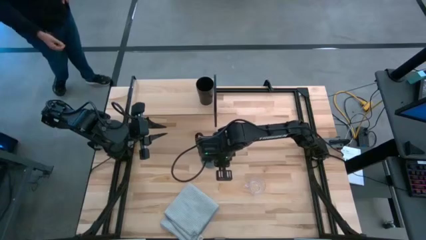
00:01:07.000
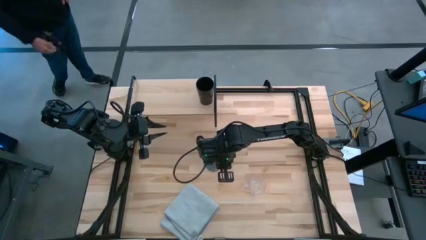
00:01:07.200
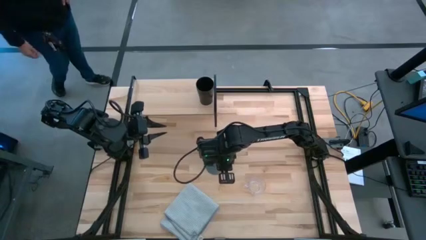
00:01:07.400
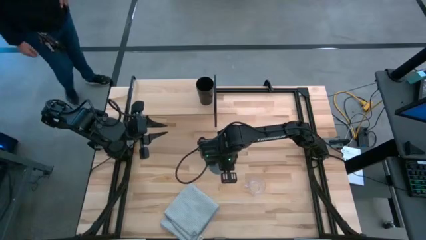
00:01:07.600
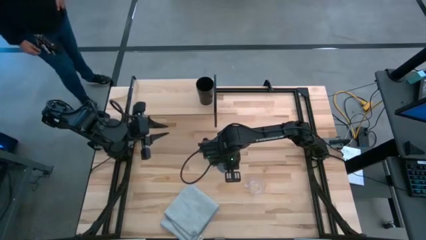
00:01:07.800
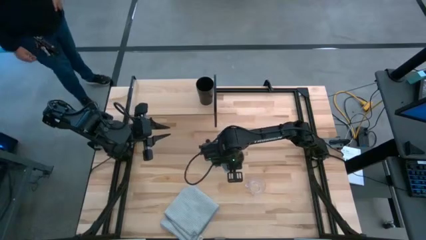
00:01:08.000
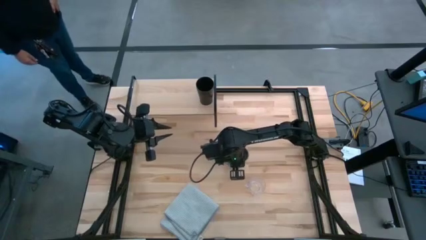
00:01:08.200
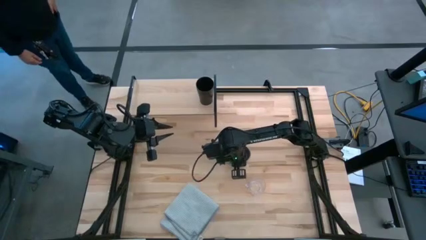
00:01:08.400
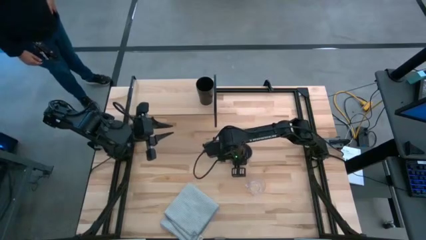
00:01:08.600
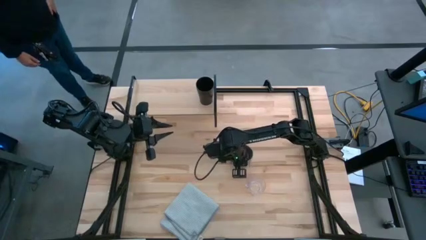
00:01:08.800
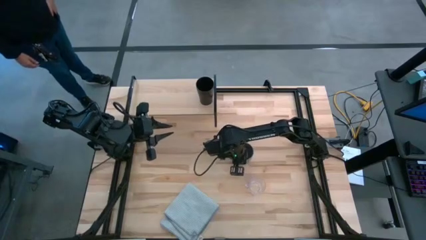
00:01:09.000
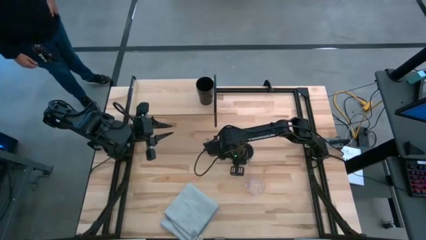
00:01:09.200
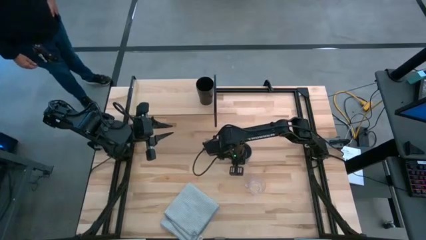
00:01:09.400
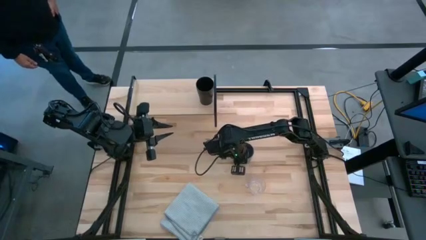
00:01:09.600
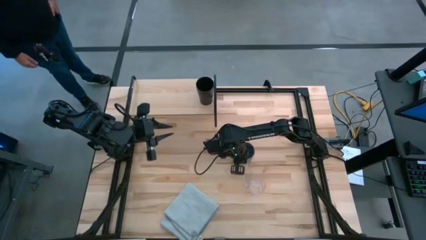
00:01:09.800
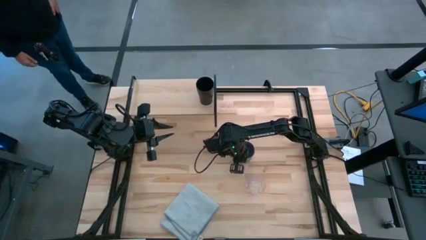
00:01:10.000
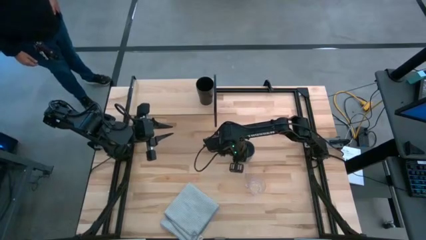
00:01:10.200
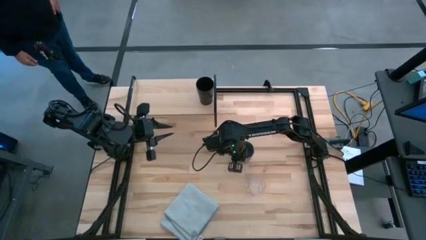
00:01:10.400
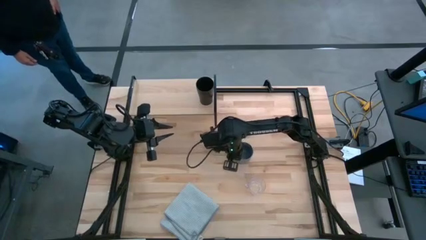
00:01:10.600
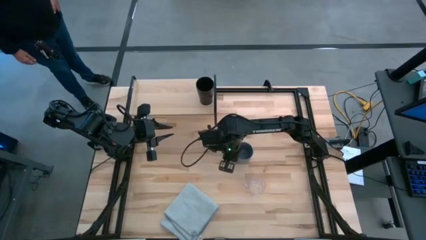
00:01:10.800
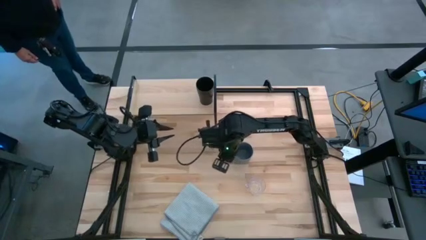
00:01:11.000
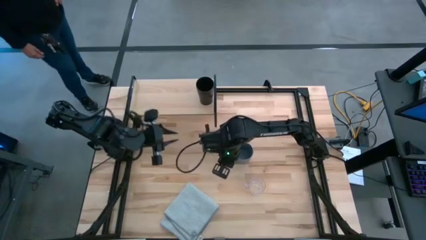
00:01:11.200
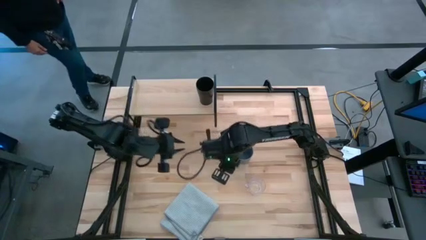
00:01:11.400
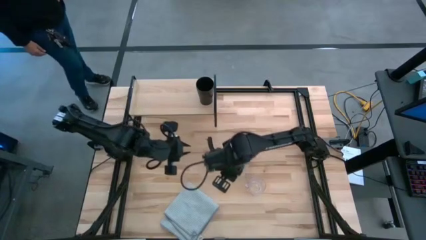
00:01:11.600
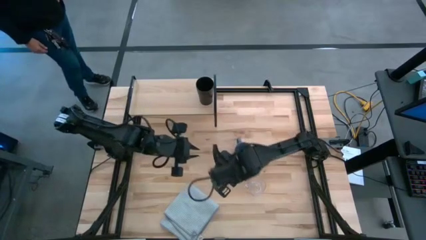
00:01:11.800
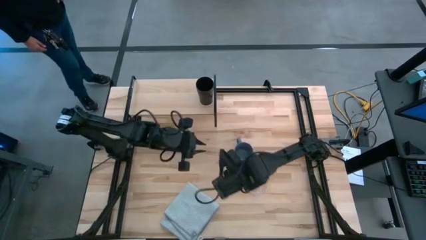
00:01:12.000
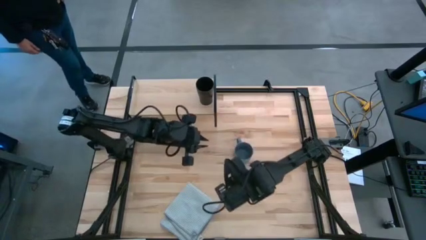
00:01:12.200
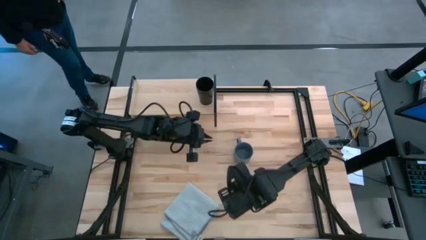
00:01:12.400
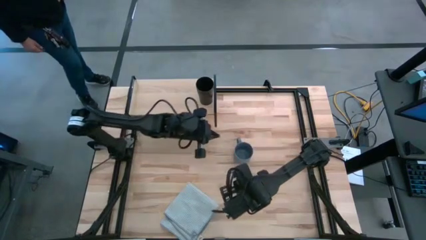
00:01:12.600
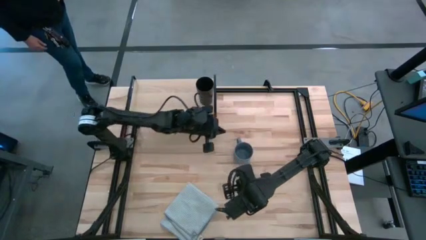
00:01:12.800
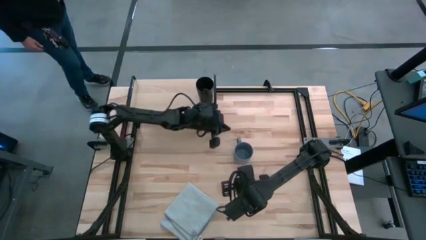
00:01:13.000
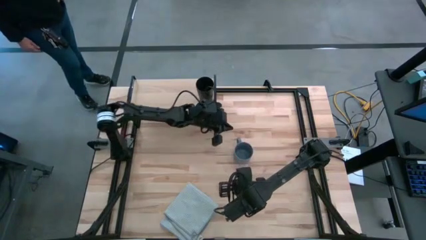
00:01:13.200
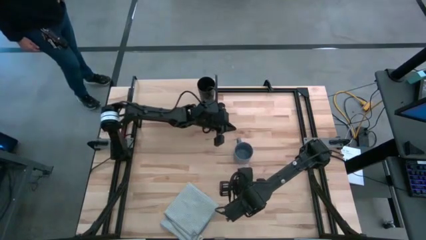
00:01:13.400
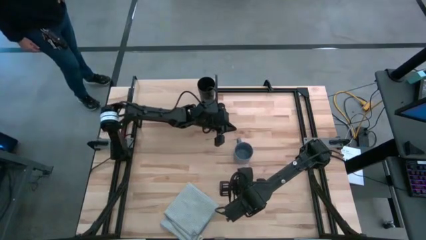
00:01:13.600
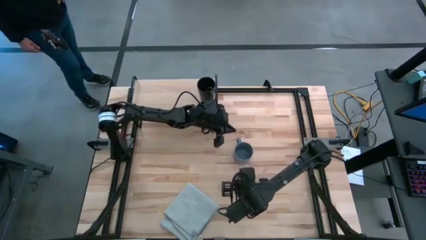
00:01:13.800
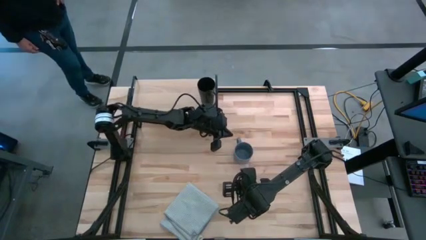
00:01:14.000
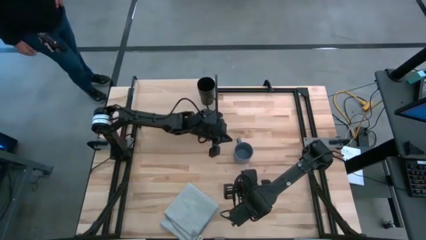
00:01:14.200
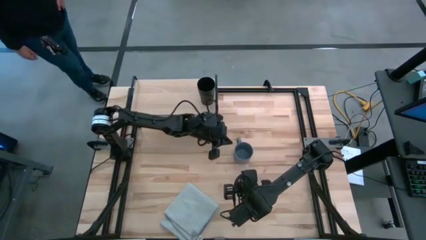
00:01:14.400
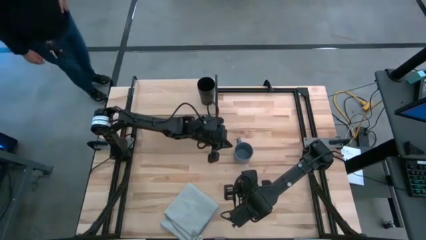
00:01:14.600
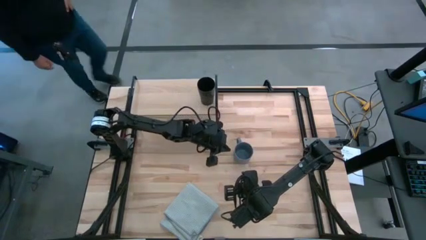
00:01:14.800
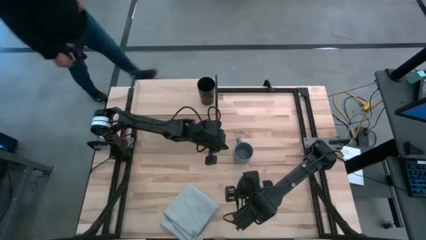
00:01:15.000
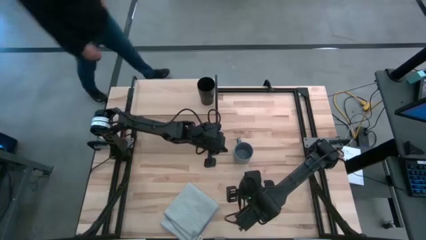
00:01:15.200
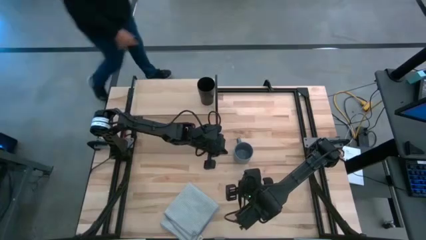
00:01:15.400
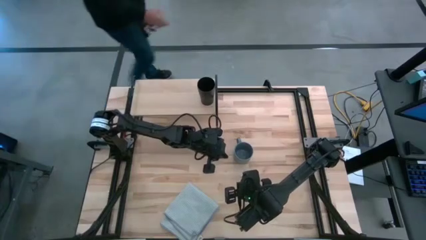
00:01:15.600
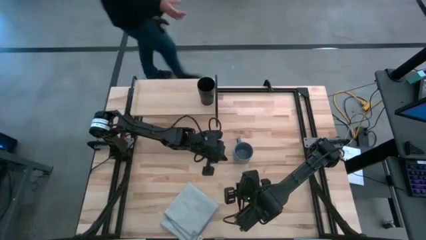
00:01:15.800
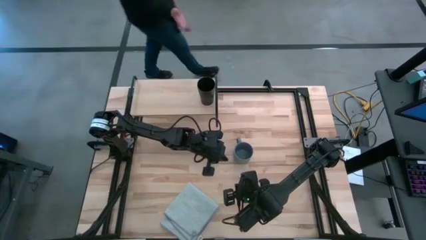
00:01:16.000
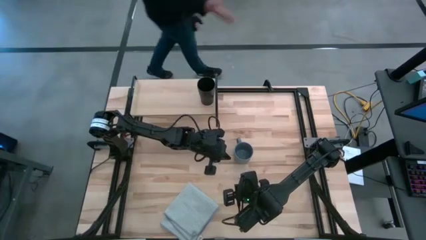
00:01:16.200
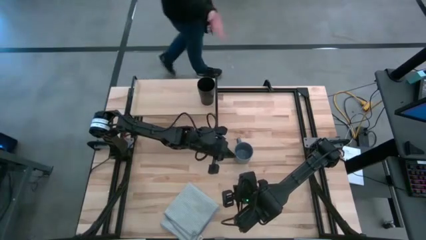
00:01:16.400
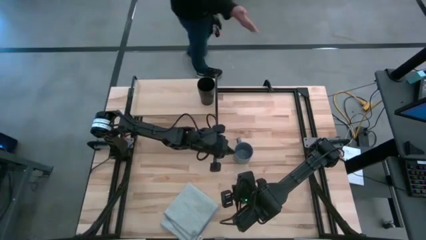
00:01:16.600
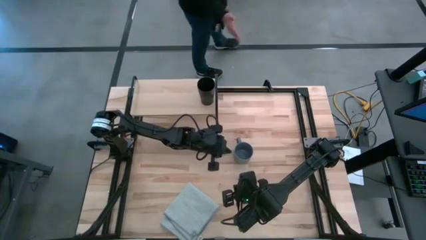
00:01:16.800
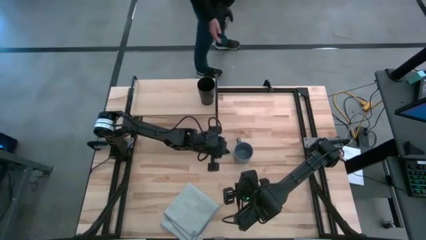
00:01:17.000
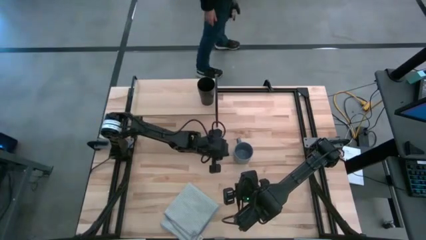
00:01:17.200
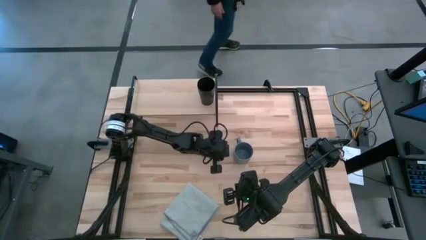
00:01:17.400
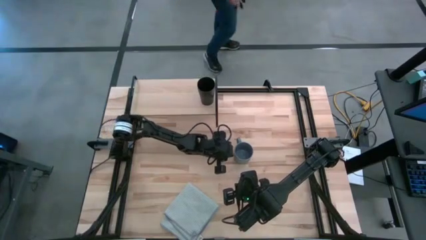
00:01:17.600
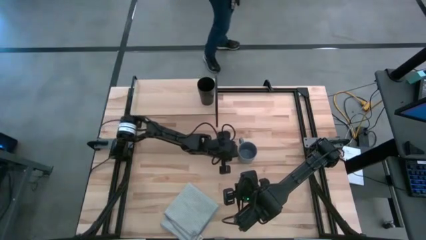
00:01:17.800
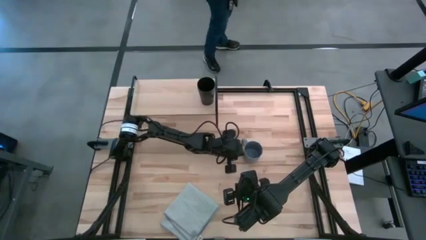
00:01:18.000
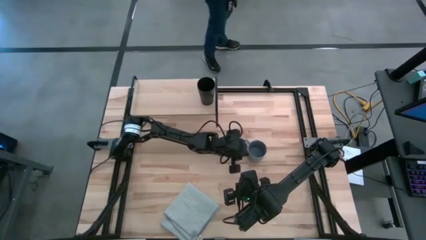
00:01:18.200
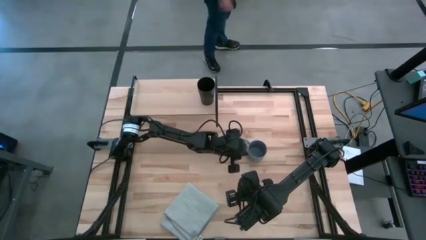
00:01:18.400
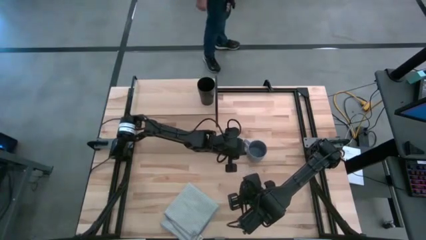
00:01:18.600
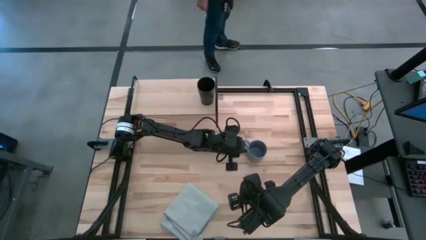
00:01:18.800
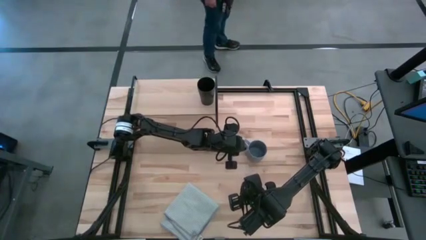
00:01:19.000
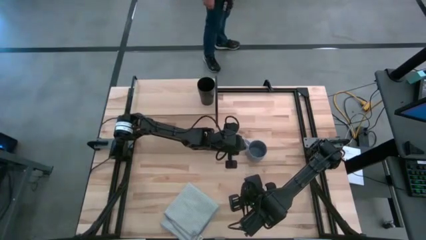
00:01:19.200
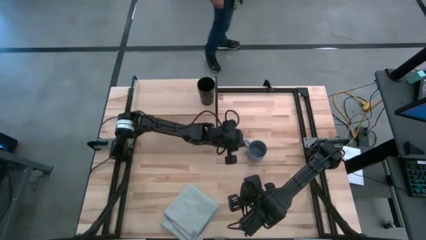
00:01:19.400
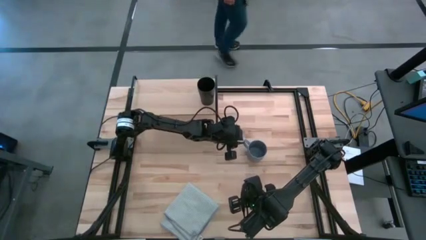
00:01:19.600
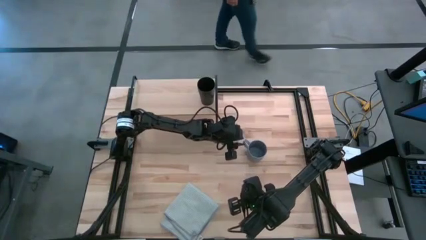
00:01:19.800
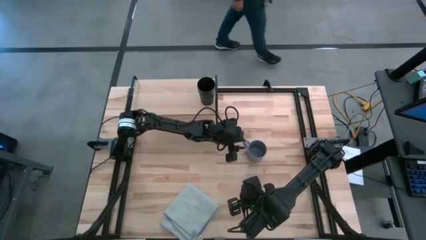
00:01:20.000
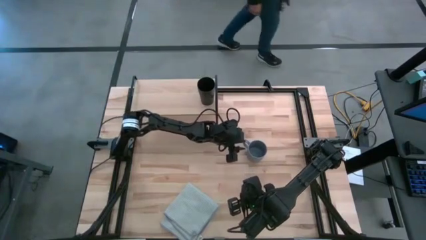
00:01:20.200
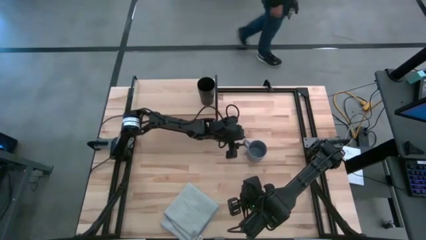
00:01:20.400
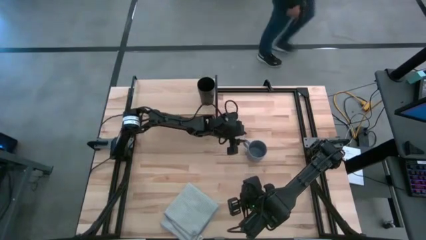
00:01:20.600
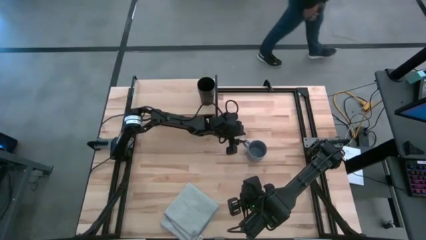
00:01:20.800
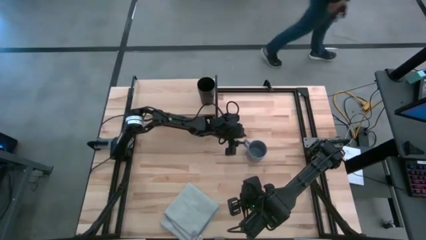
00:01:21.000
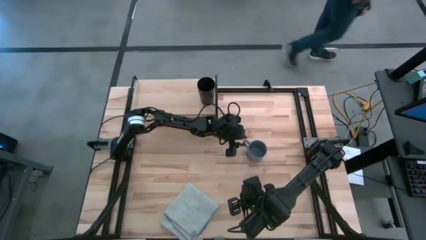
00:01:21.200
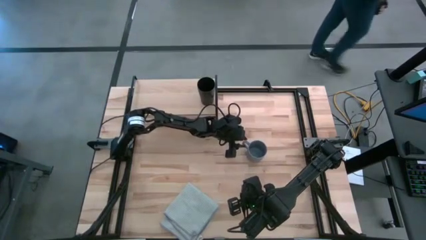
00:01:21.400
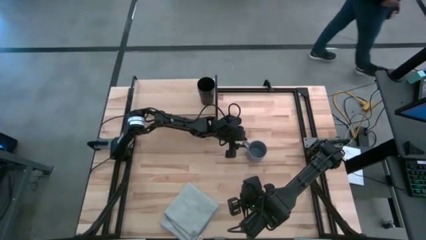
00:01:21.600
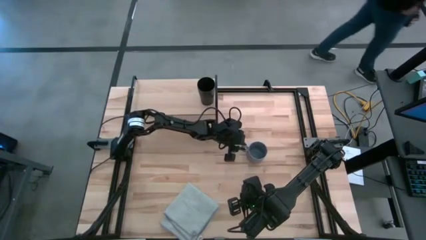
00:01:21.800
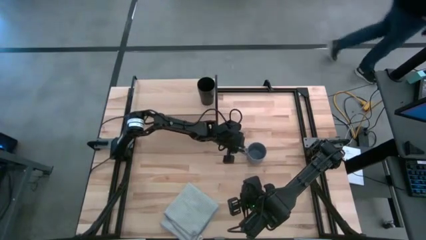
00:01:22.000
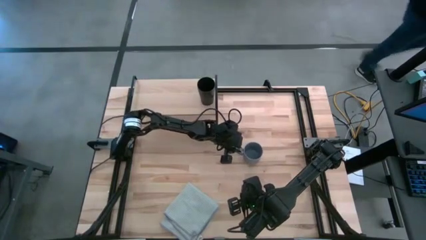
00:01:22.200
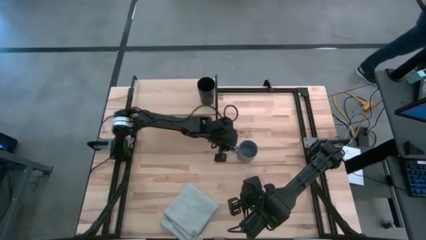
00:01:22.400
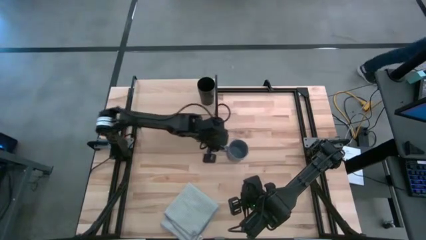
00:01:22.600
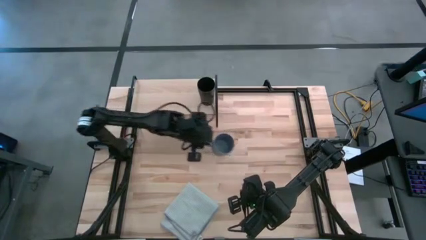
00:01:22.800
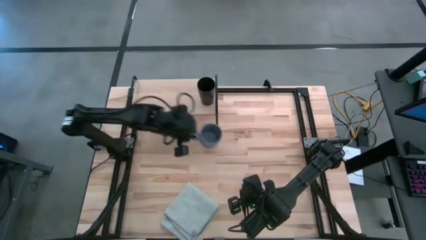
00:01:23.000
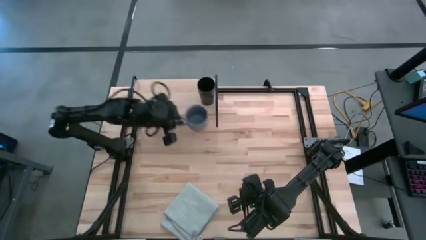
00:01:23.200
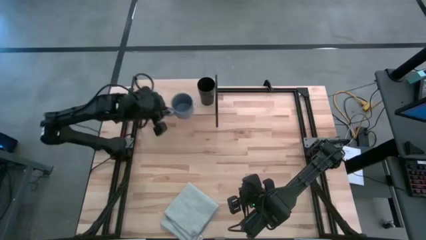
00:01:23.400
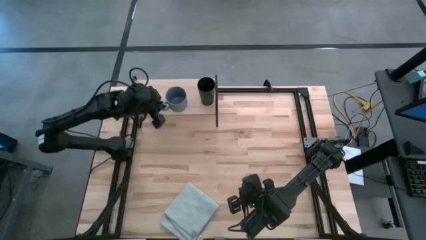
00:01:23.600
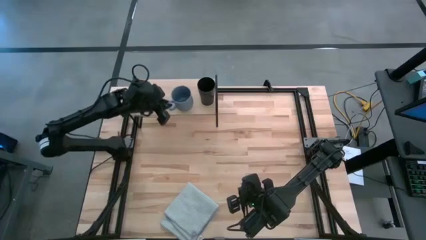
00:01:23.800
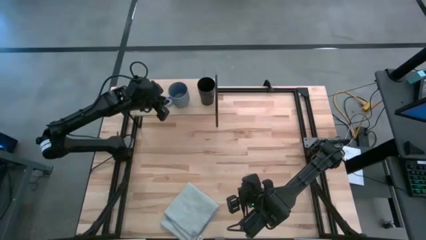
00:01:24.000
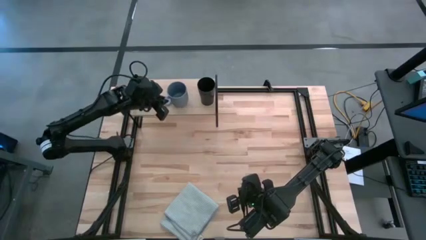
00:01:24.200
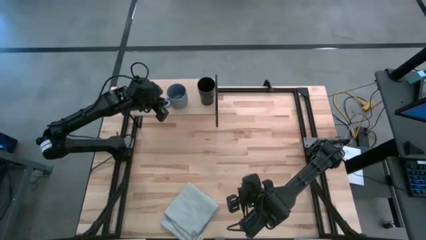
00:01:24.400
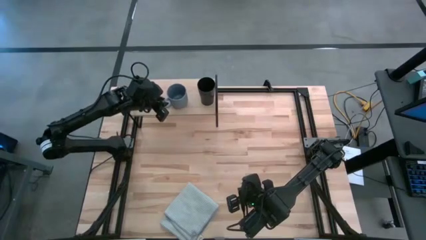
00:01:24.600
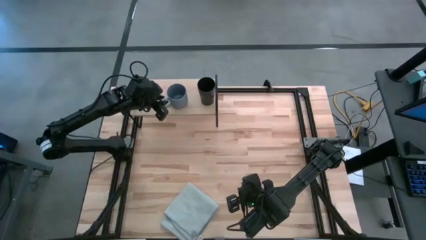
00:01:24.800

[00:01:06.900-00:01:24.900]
Task: Stack small to large cups/mugs on shelf
Put the blue mug on the shelf
